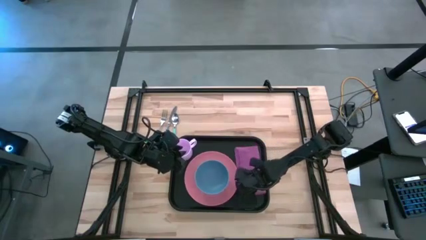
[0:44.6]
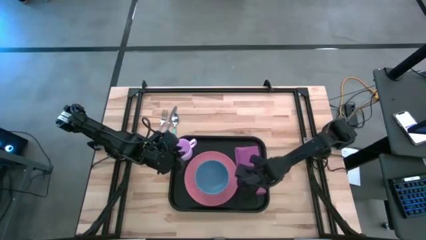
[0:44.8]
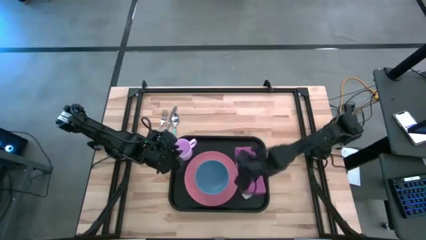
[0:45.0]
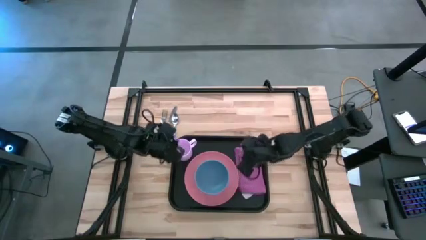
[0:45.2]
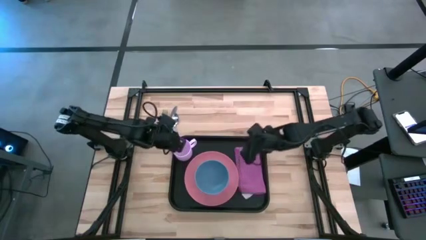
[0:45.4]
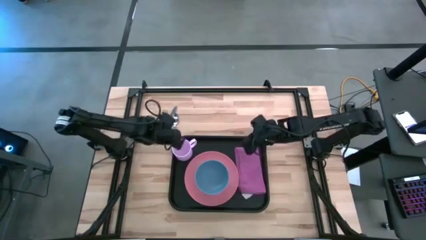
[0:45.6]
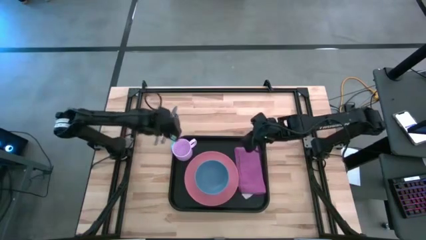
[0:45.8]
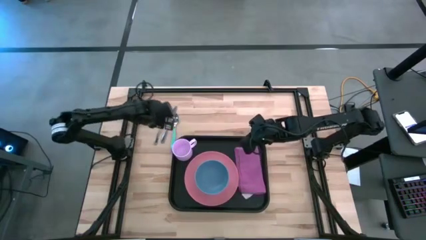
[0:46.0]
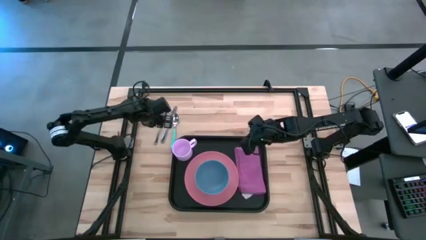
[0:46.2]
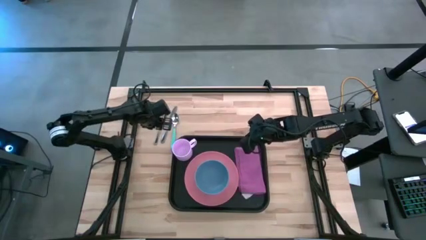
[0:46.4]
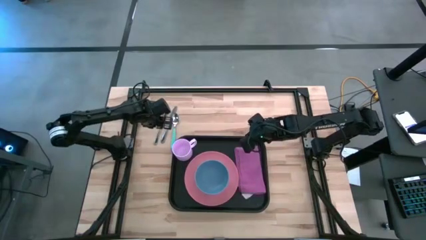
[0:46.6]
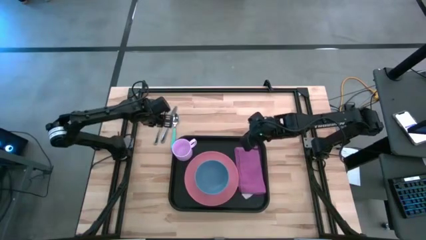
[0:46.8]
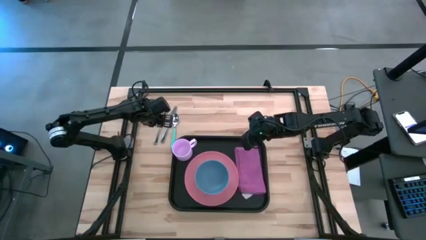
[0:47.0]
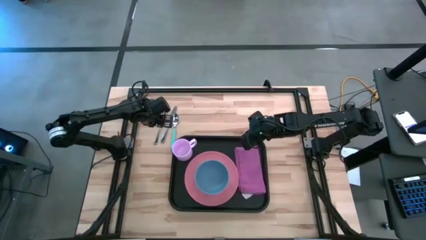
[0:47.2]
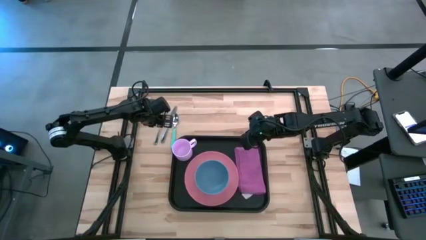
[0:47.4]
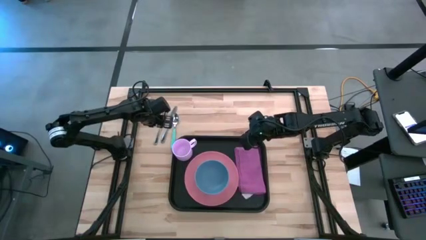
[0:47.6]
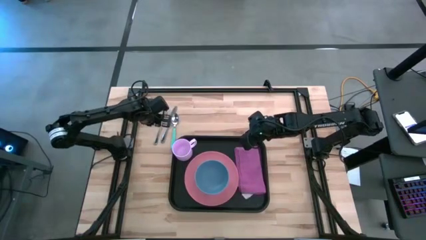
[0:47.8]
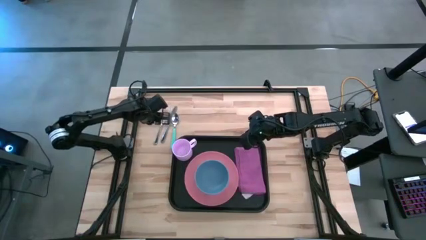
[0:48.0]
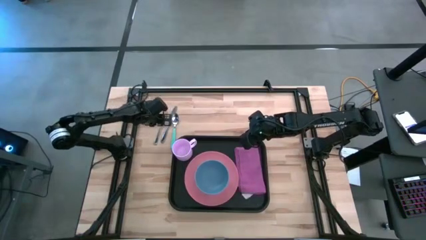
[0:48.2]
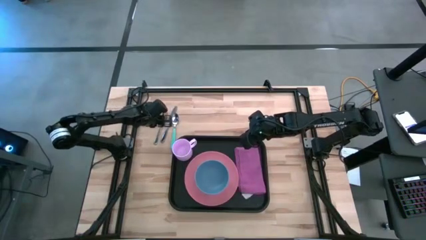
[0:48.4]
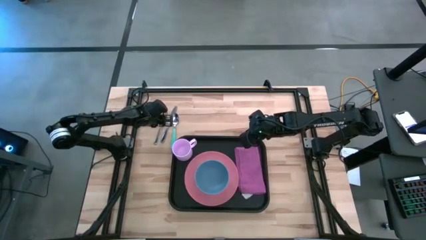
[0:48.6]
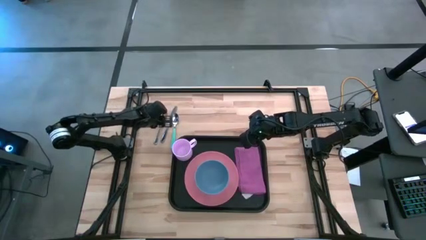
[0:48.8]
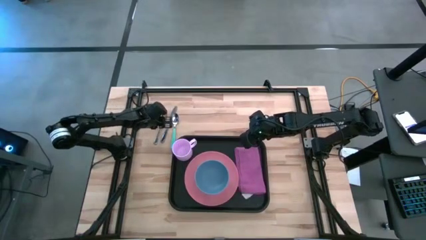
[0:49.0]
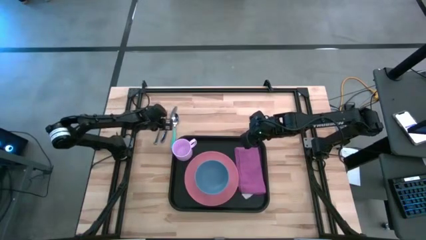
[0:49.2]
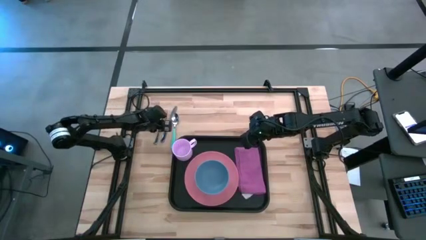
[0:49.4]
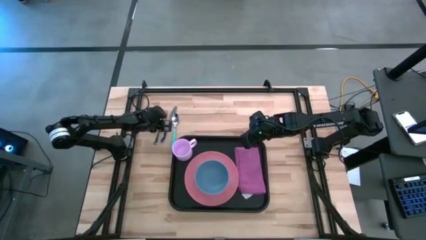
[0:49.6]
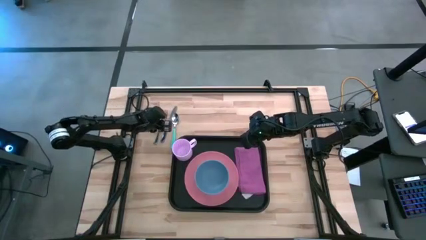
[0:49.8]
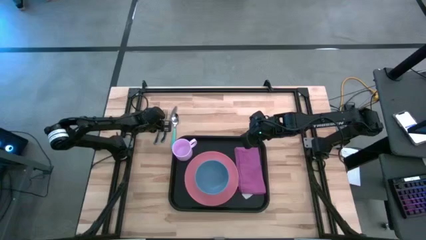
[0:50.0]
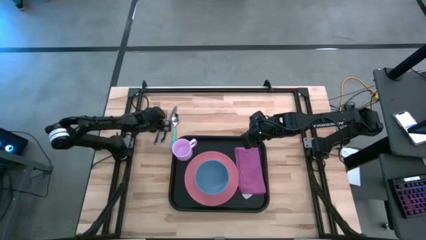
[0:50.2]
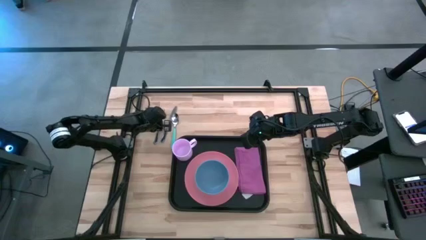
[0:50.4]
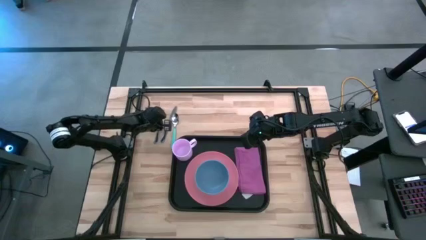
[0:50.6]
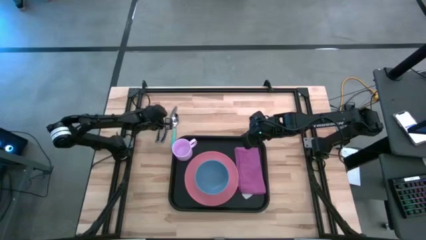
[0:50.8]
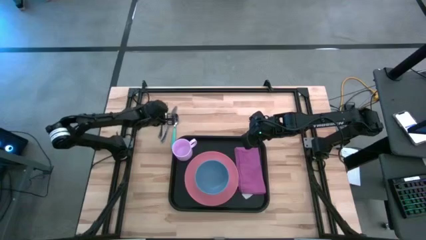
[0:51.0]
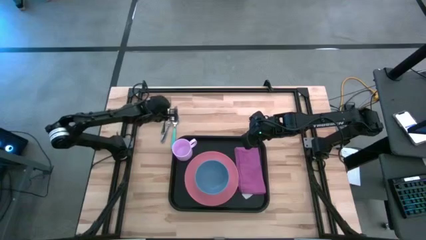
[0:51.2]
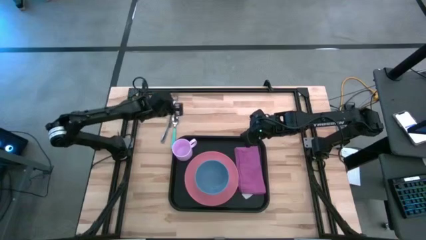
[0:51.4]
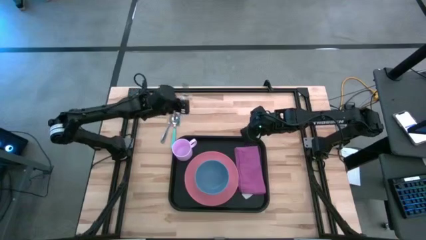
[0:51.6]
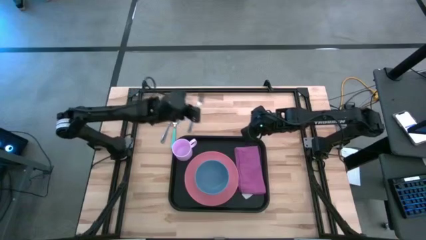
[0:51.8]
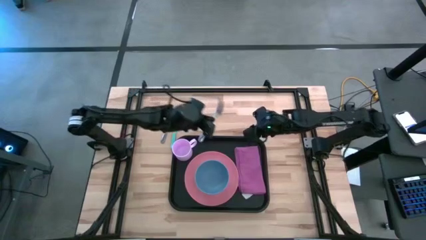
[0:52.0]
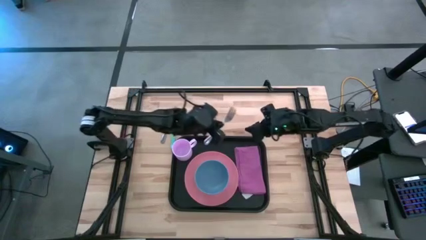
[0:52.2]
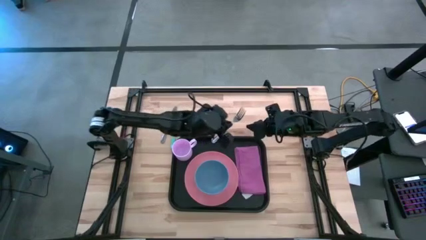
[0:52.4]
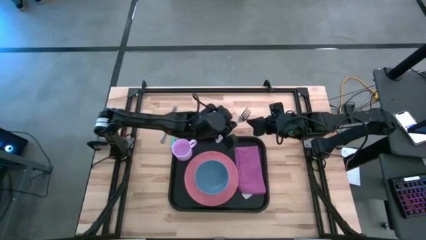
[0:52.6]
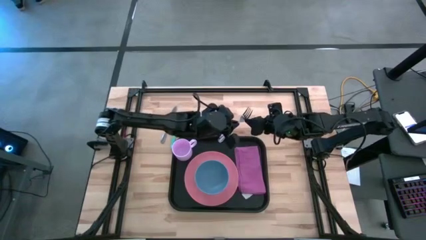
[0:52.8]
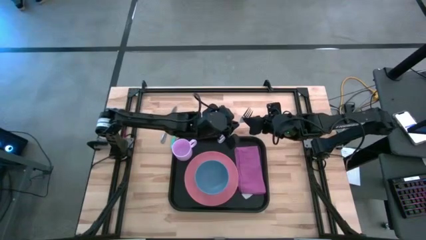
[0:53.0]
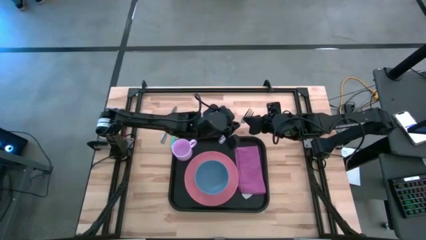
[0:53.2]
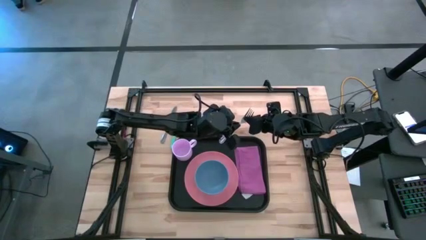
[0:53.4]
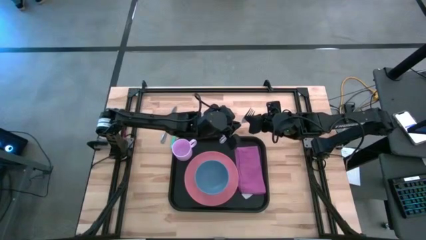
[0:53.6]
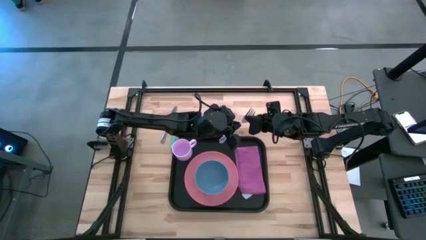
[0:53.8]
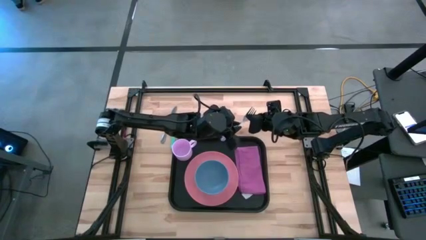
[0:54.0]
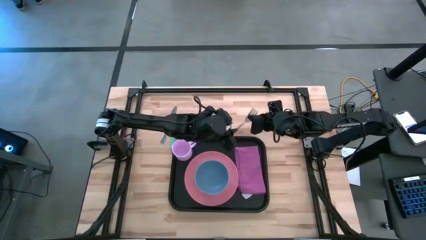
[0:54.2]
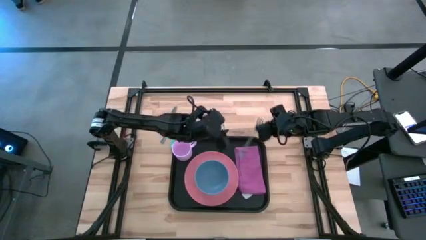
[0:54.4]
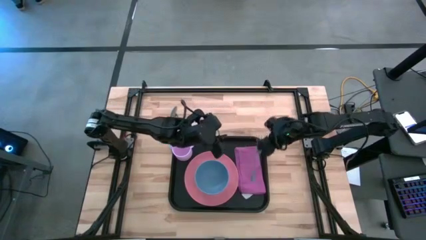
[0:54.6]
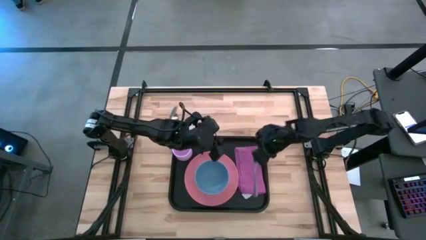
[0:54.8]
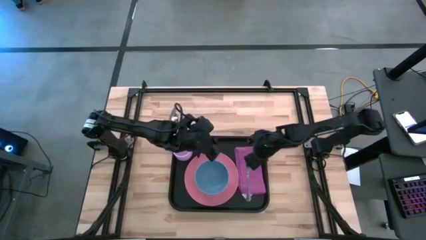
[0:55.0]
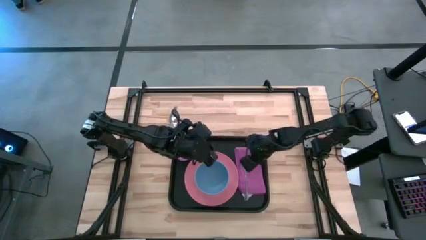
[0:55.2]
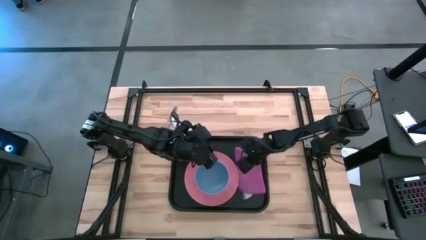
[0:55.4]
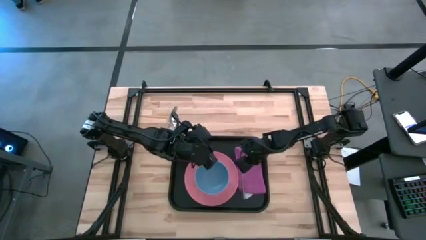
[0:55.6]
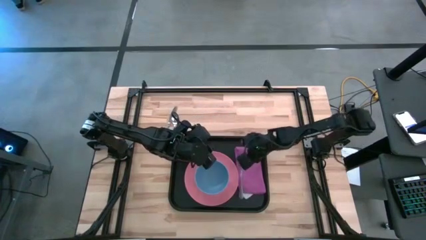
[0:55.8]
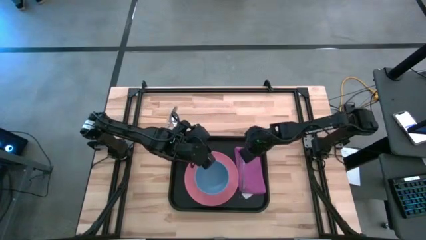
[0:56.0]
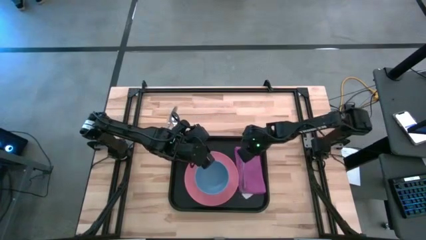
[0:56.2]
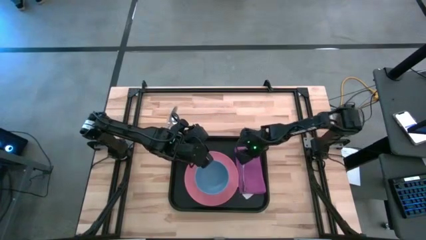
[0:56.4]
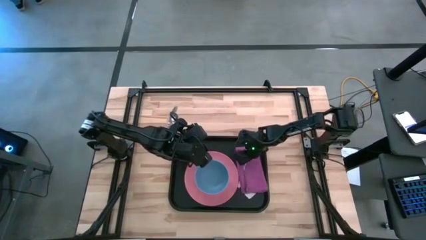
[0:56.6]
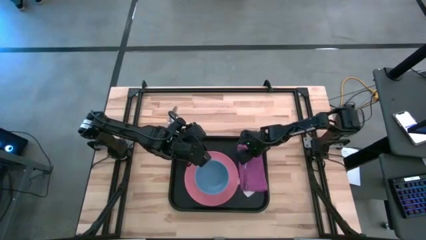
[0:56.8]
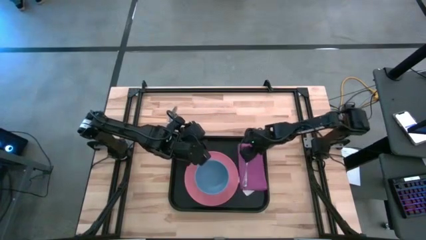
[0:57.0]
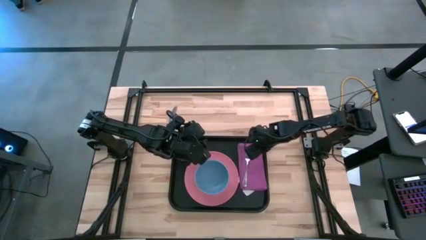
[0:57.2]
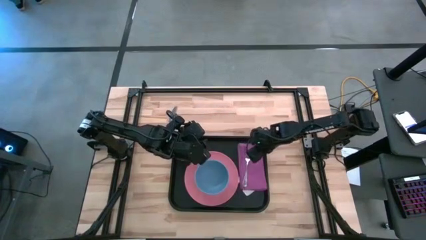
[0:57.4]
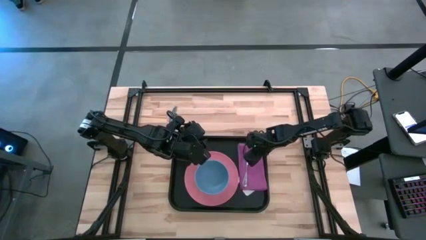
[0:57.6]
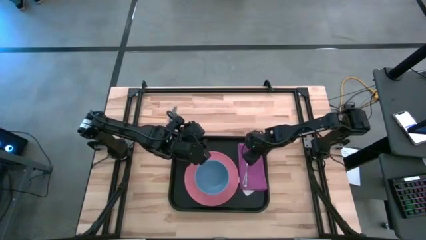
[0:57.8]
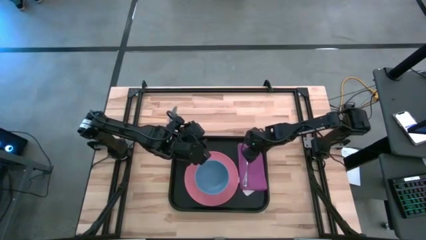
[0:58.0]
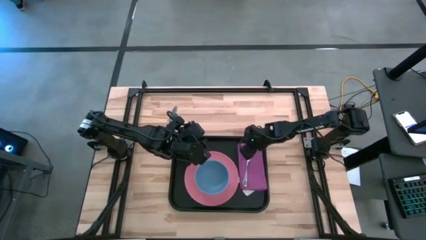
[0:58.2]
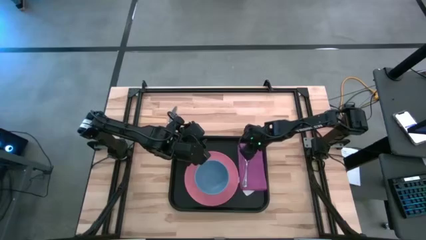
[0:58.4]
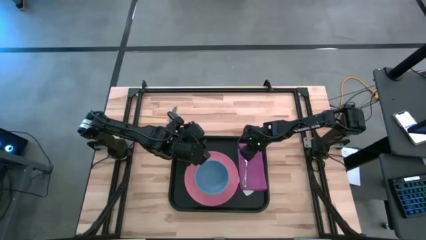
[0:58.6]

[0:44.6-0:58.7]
Task: Set up tray
Put the silver fork on top of the purple napkin on the black tray
